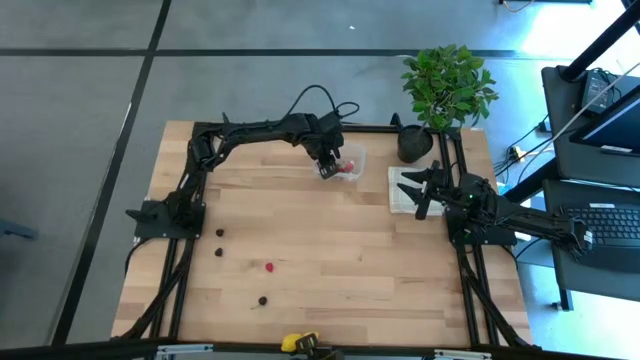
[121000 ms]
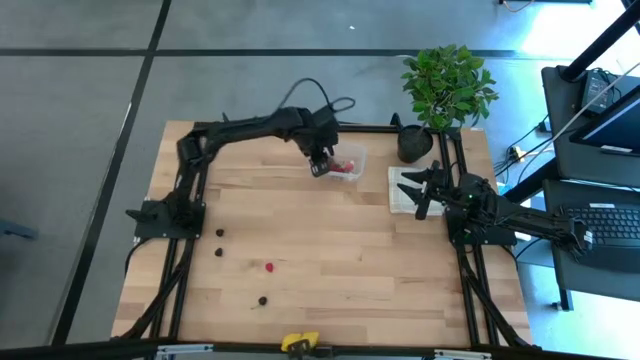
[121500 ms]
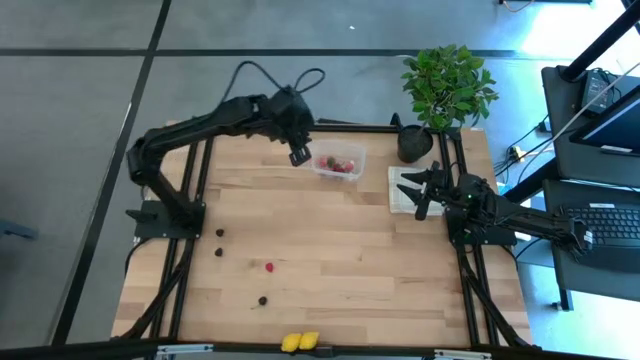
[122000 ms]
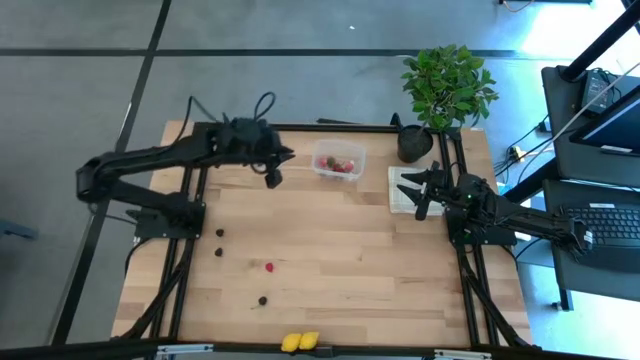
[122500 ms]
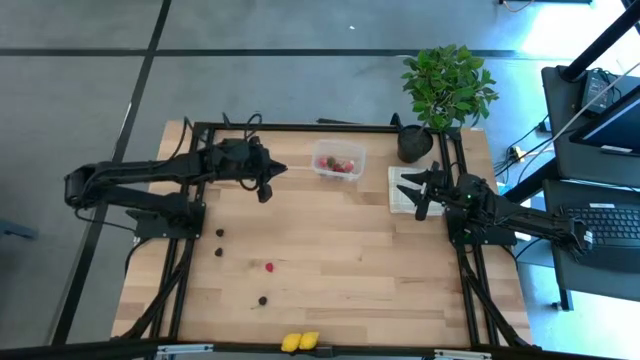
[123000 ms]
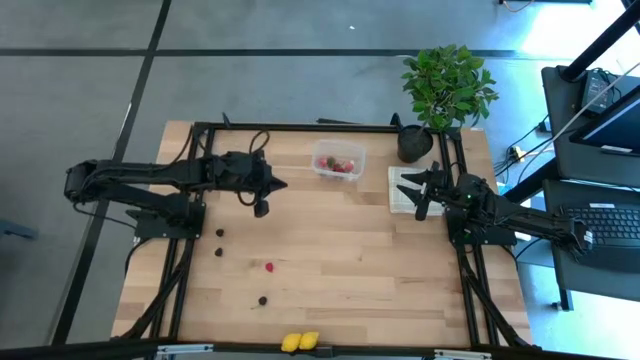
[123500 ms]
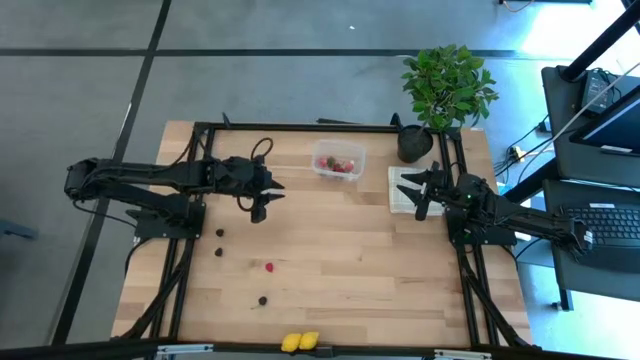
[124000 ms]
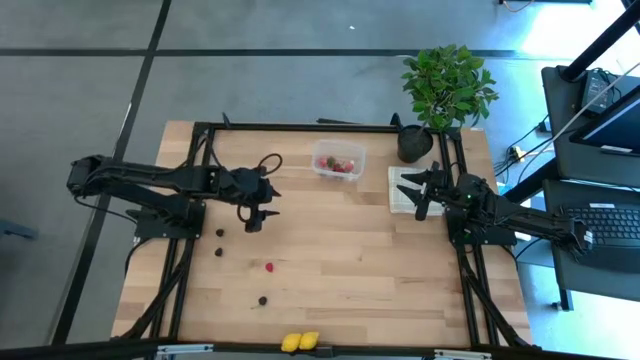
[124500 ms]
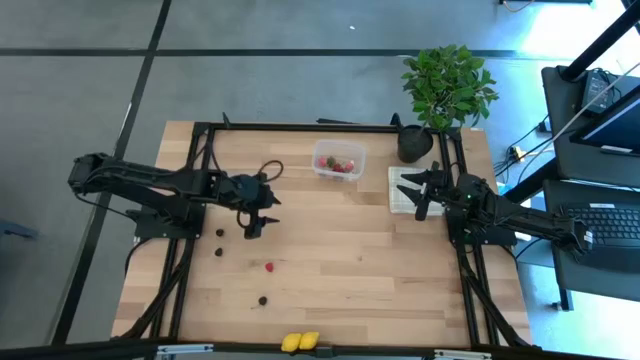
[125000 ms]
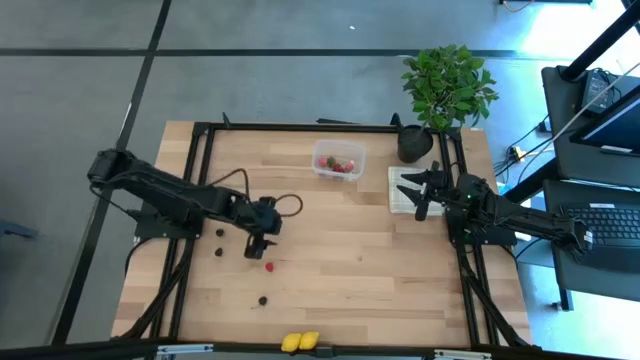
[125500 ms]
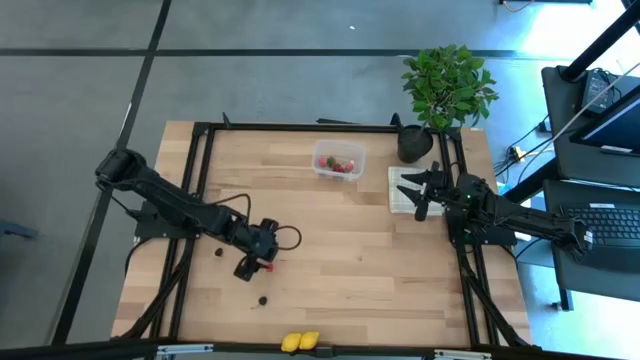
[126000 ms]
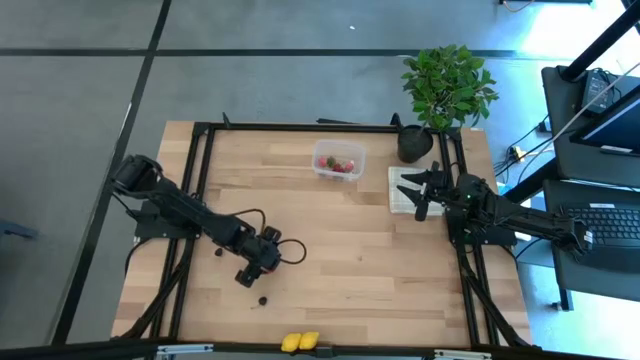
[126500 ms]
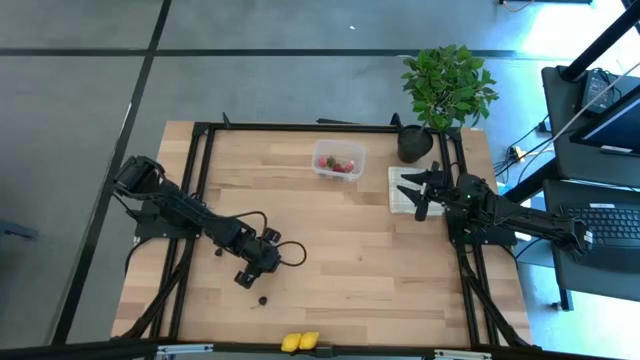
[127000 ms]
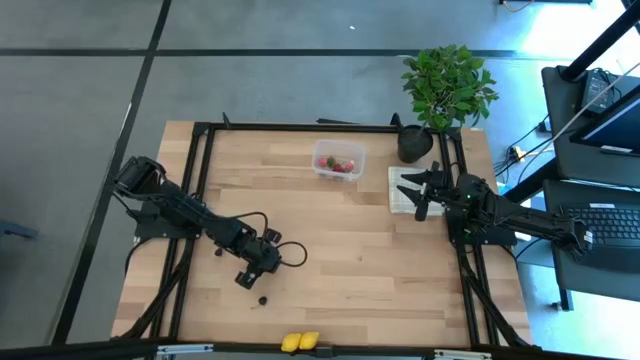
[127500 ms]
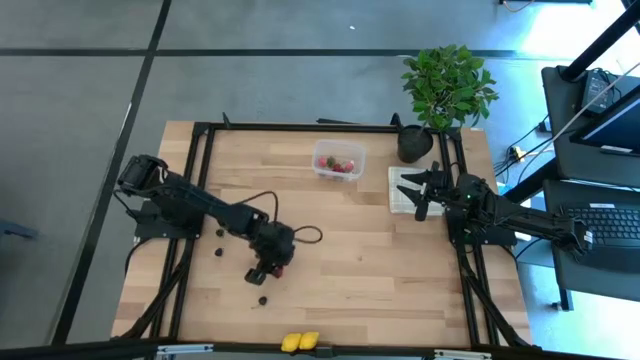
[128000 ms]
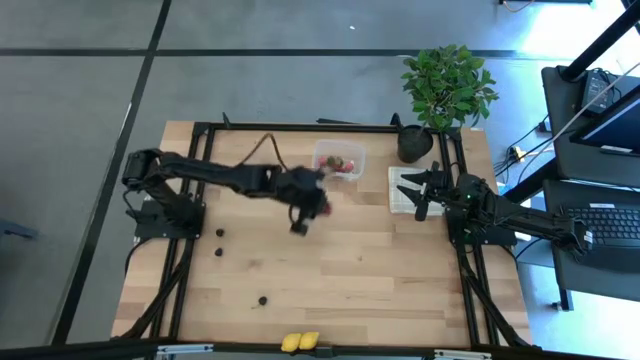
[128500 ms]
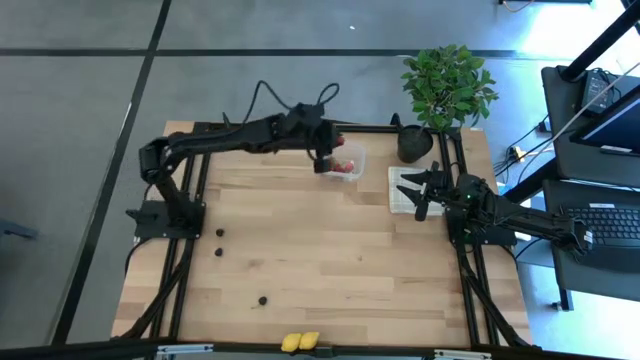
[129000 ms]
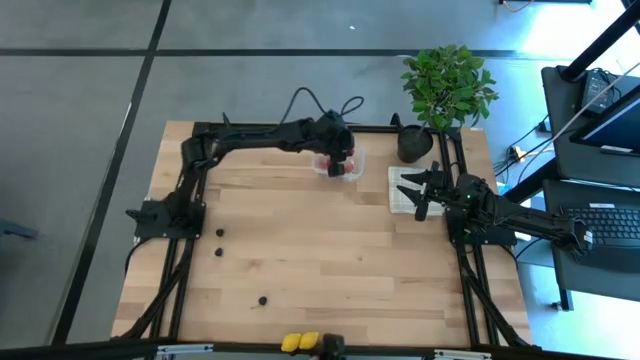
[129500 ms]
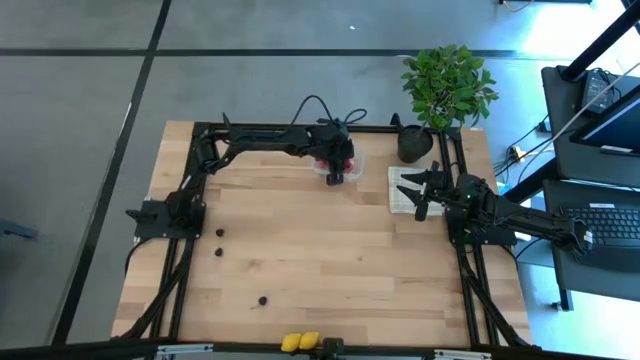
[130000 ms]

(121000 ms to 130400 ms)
Task: Pick and placing Produce into tupperware
Put the raspberry into the transparent container

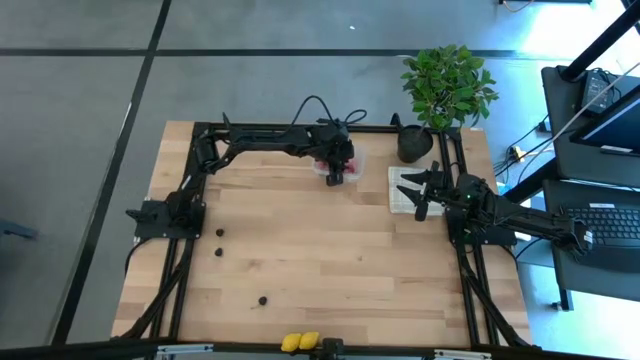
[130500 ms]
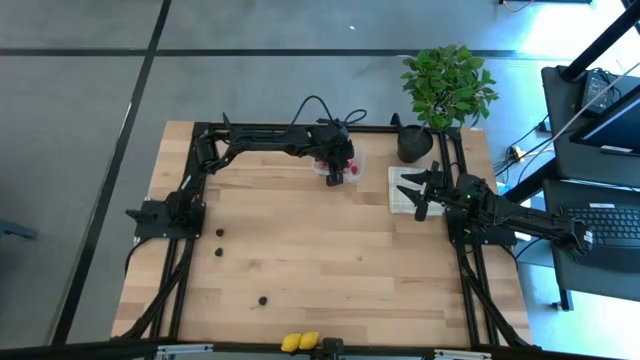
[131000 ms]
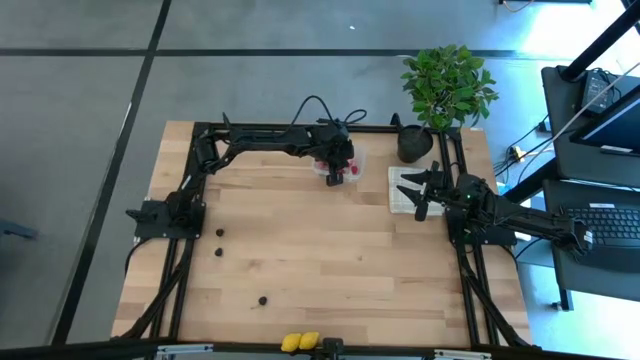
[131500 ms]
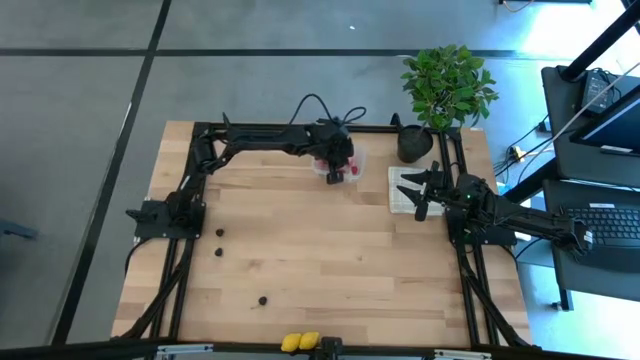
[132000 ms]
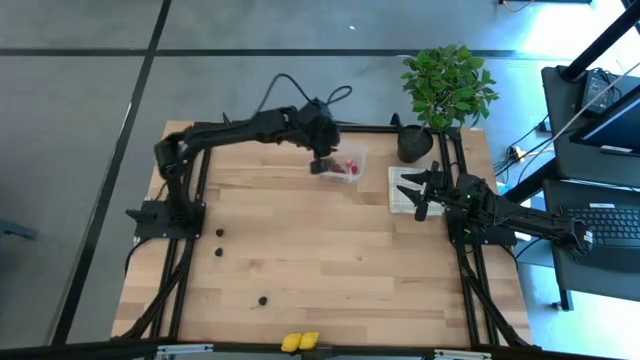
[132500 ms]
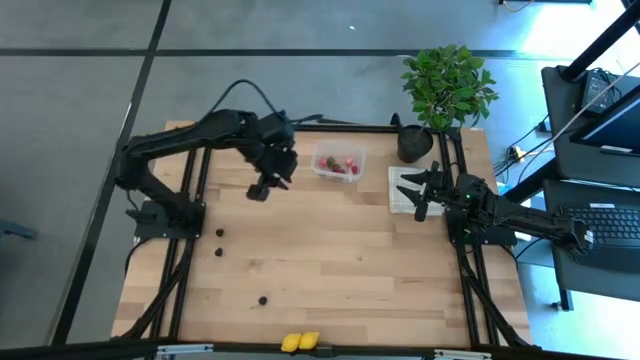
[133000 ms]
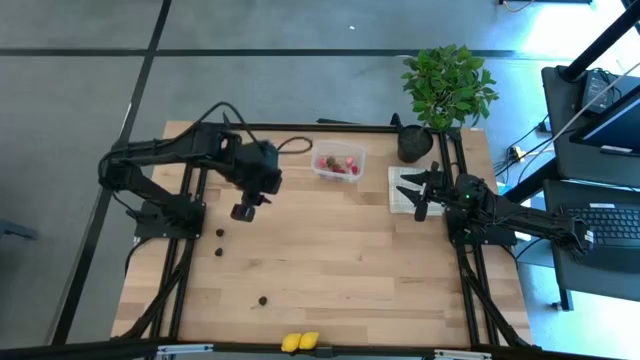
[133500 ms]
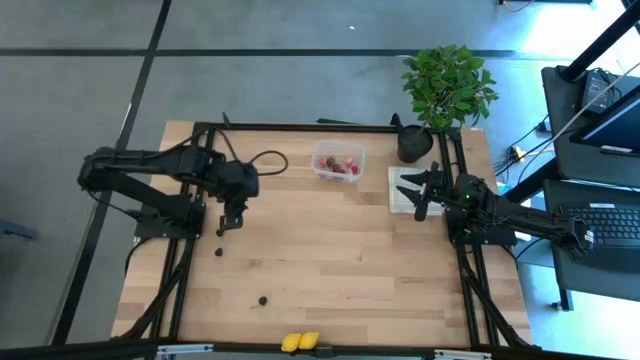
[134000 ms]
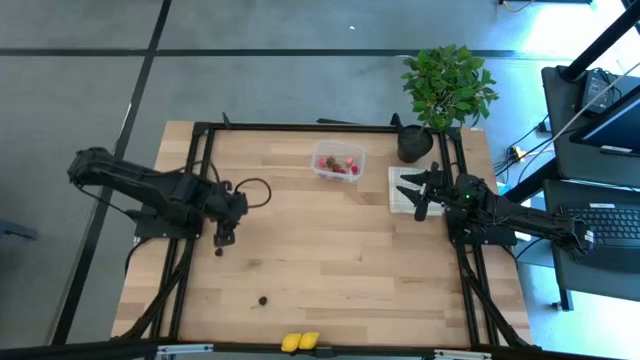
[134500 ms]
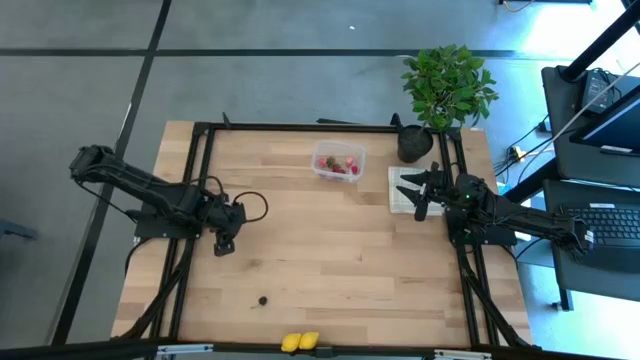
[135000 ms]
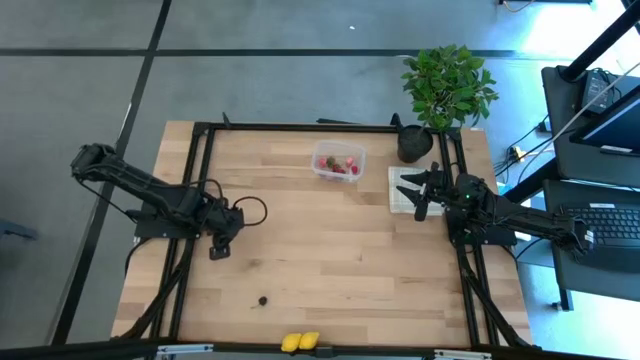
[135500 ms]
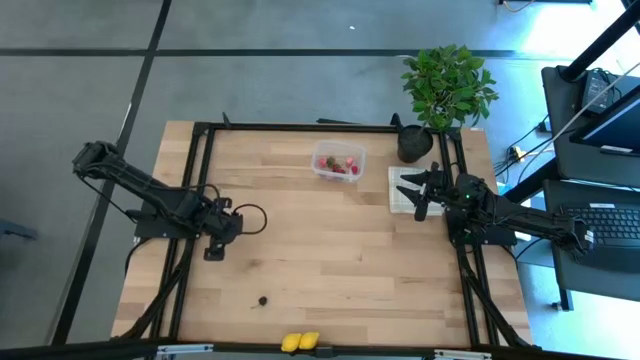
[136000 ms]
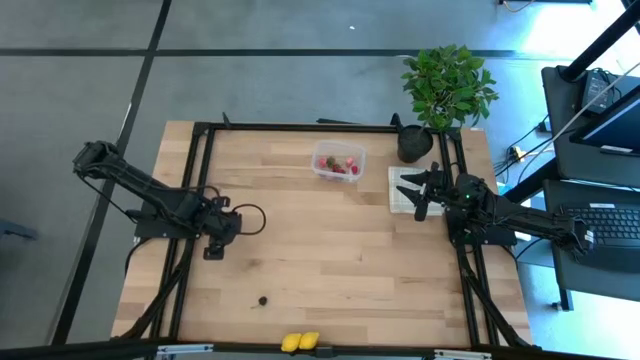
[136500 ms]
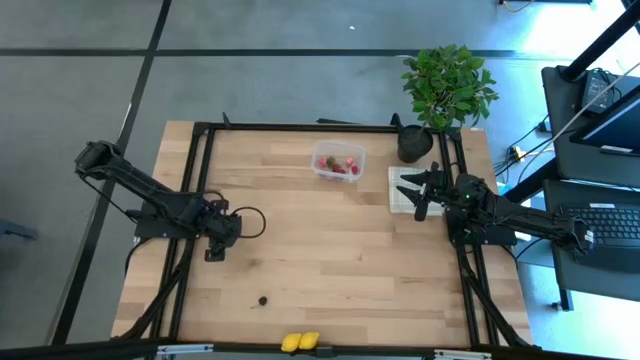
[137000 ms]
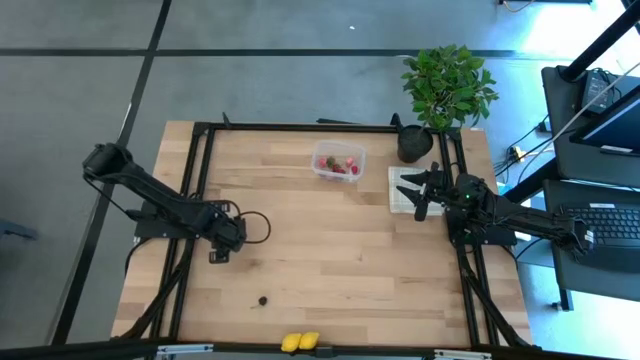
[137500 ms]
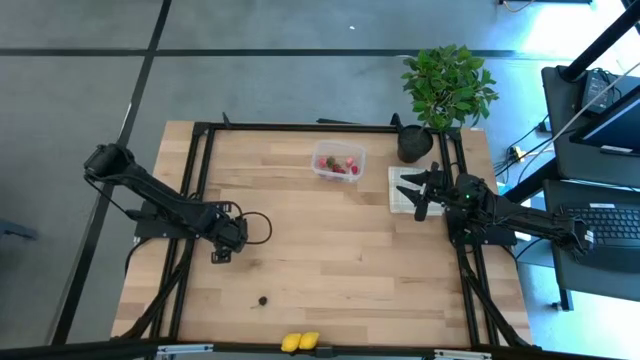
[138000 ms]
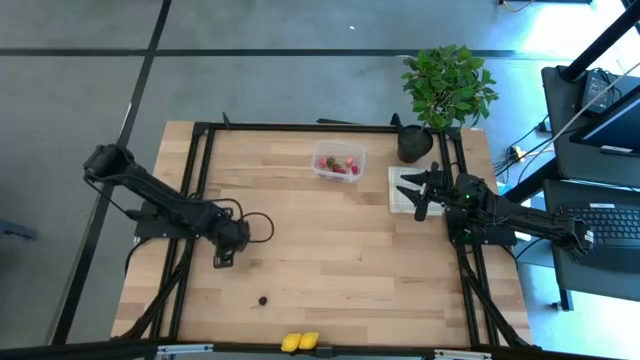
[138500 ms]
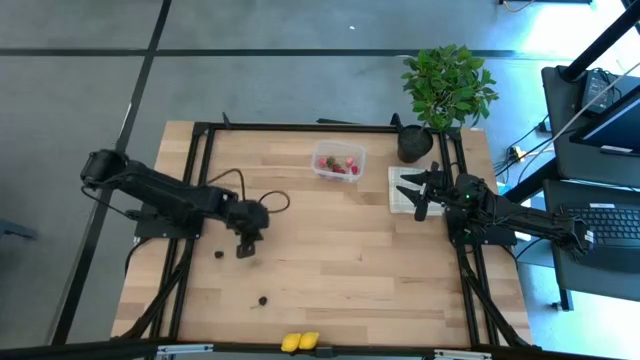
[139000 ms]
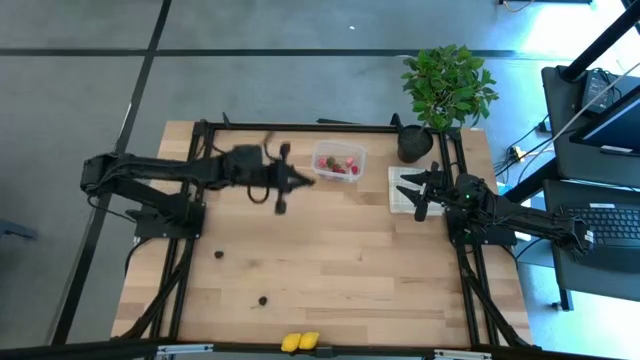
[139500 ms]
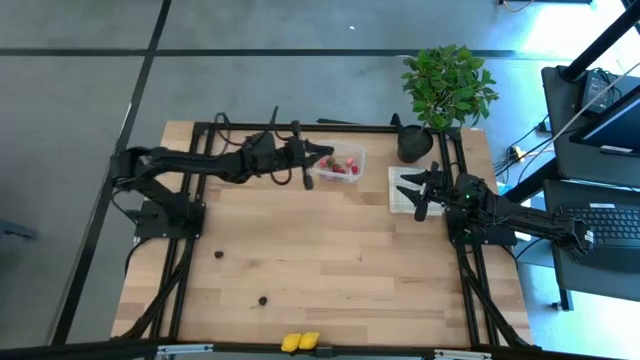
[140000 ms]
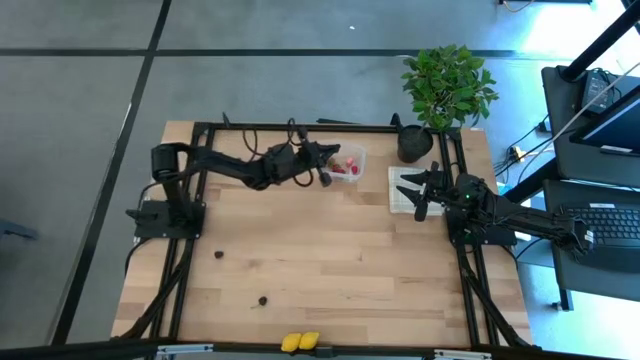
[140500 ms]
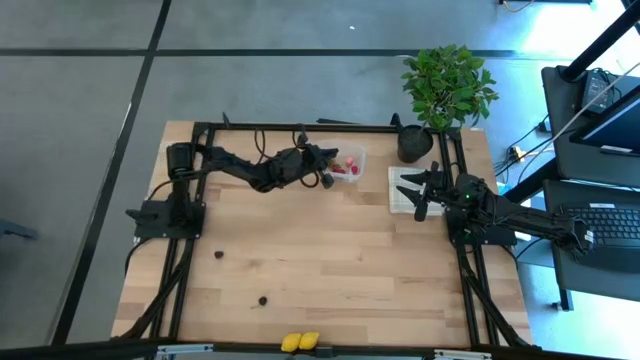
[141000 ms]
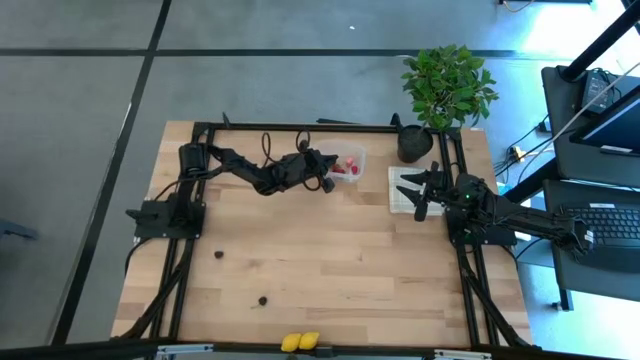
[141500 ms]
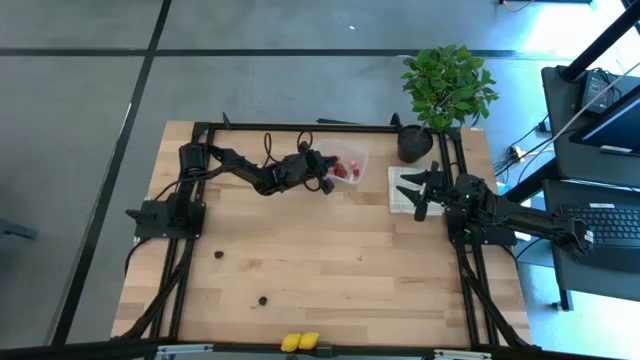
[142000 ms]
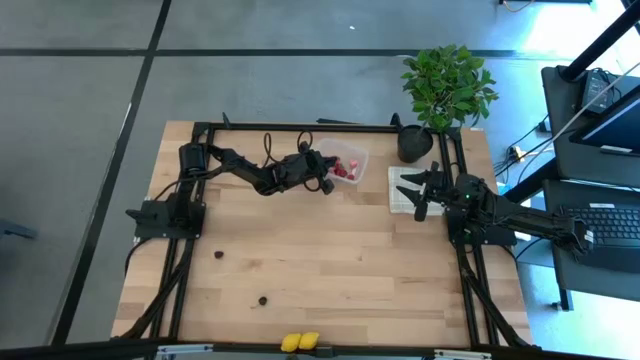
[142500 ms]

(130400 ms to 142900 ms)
Put the top black cherry into the transparent container
